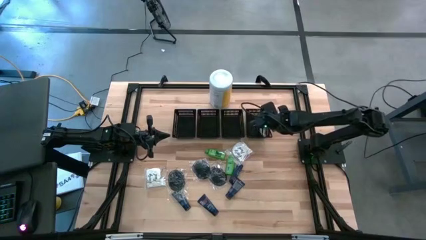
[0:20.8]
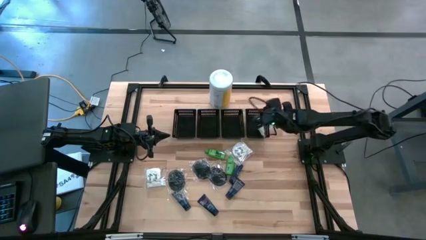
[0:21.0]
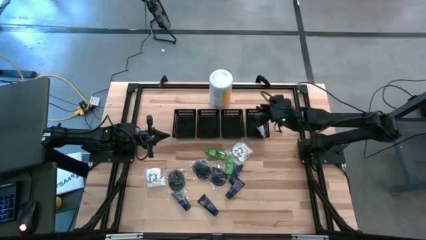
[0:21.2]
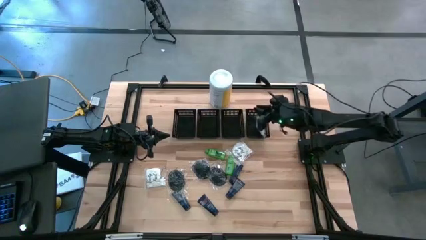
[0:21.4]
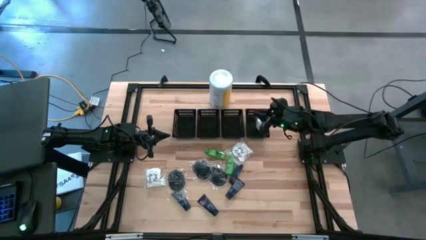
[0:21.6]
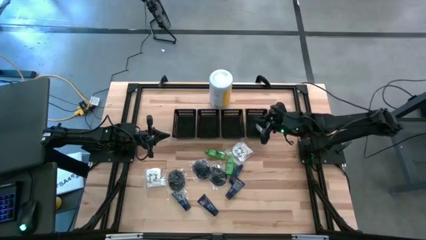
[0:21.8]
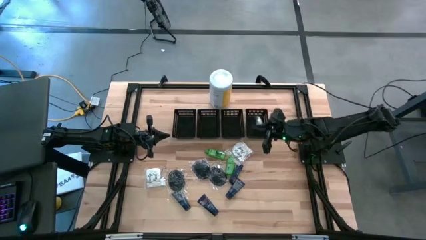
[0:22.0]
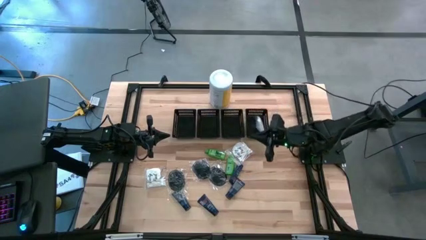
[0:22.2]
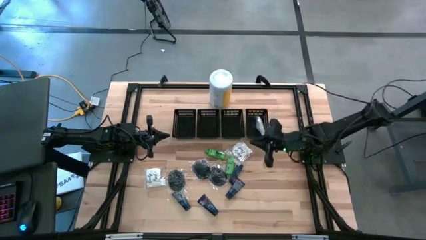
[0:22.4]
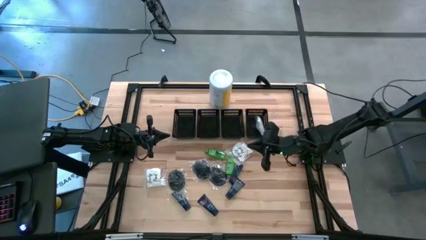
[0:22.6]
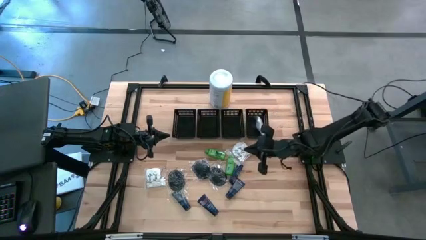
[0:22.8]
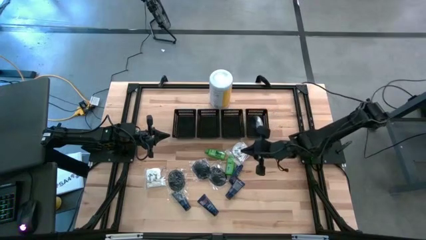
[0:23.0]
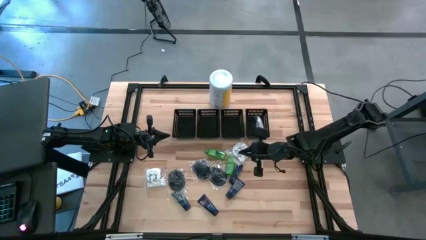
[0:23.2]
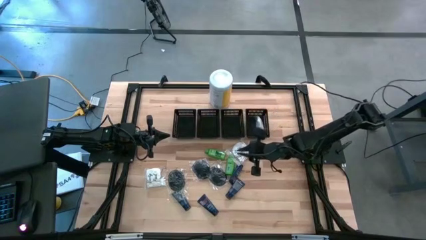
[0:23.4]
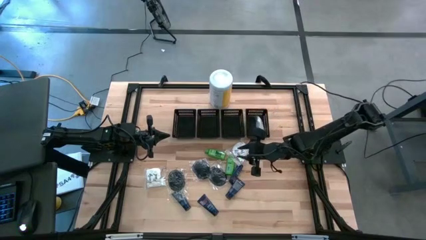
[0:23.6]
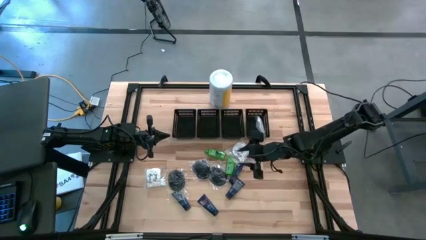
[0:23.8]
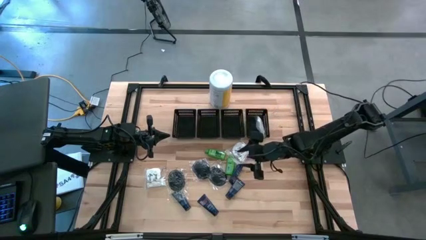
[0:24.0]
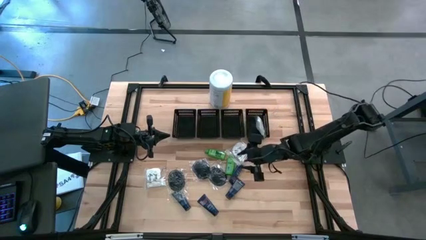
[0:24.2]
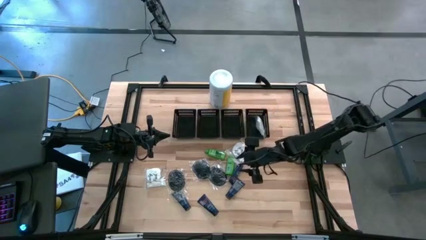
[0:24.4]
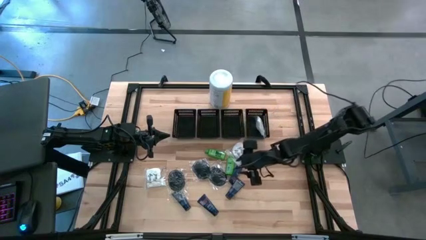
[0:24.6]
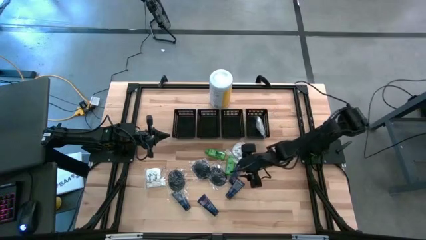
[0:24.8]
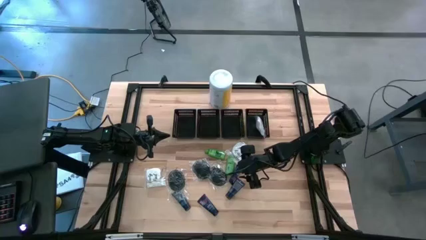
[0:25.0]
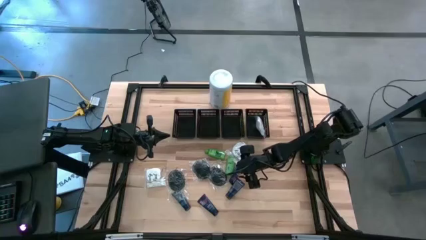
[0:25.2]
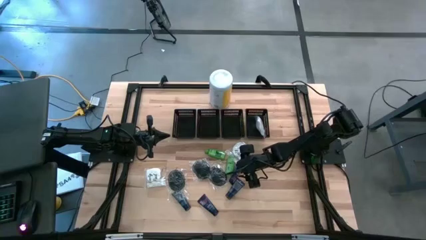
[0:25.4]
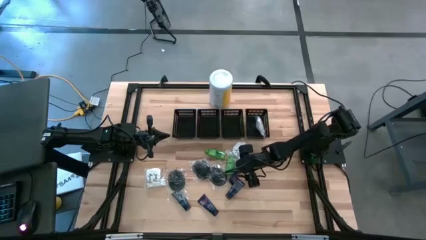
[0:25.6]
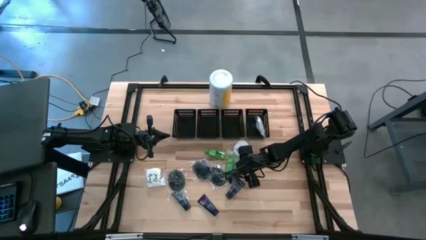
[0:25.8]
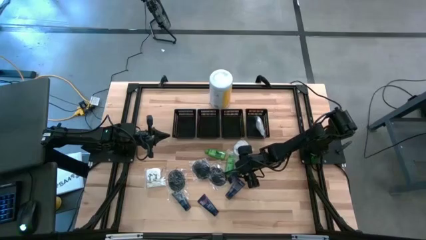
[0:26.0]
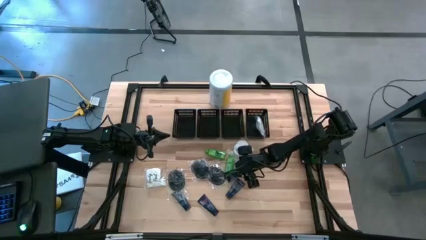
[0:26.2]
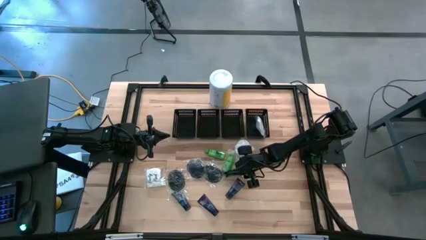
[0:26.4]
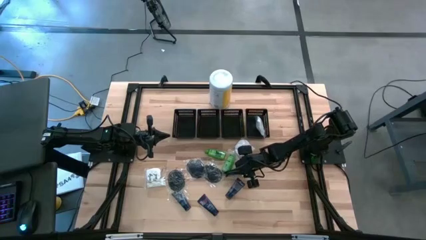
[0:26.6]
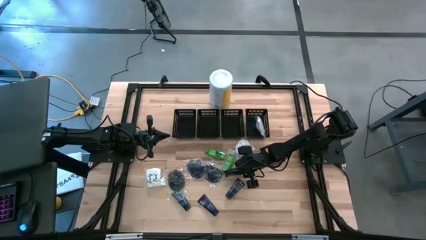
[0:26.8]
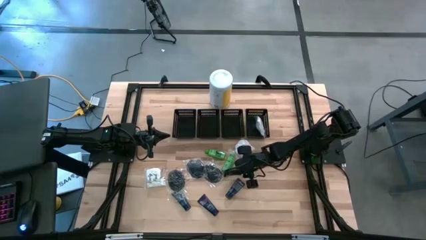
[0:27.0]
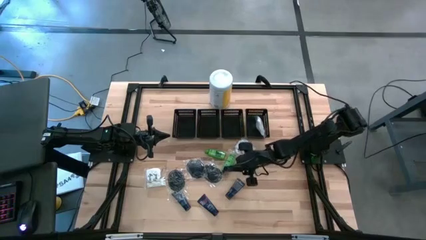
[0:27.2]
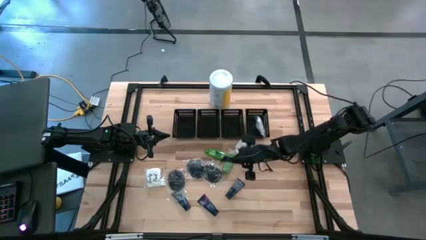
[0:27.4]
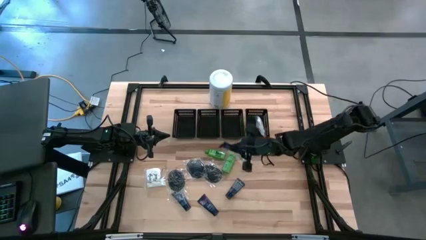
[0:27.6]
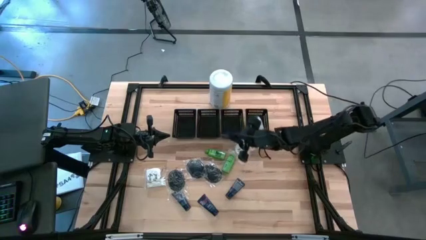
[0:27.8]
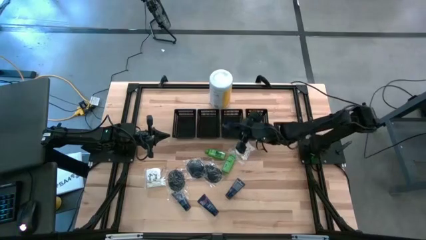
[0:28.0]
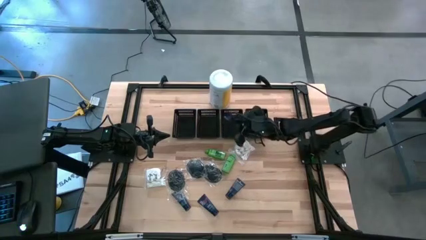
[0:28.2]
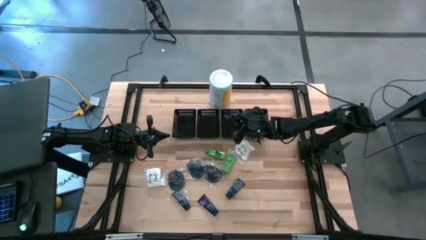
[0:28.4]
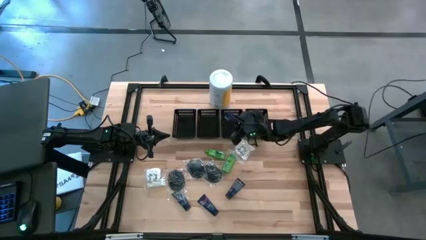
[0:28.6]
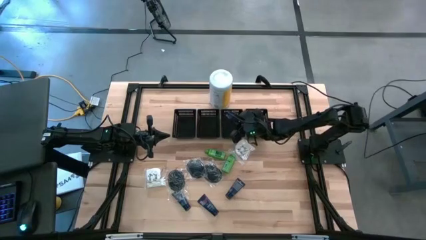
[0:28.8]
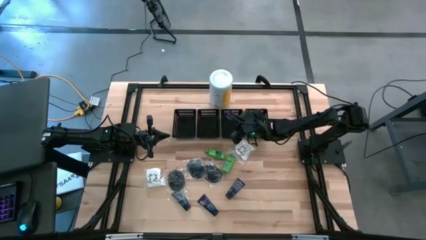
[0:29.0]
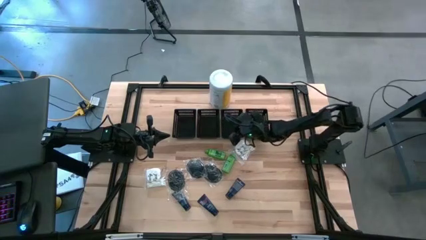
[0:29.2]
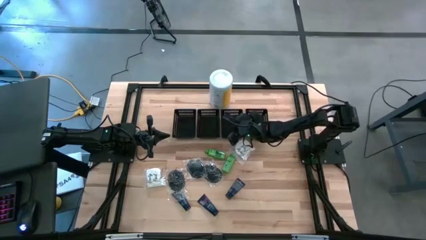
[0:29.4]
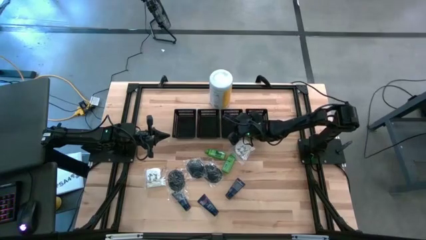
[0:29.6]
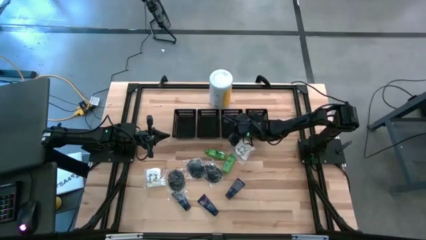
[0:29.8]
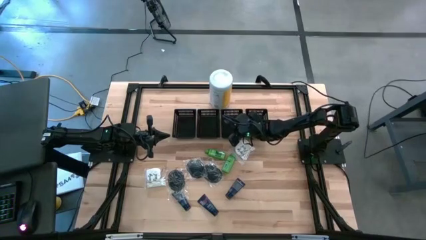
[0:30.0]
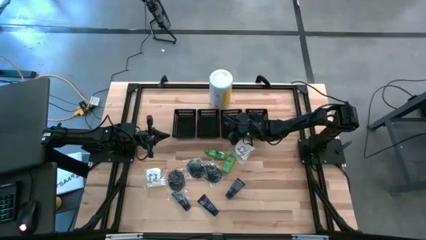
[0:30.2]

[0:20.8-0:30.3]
Task: Pick & Place Travel size toiletries
Put the top right shave cream into the middle right black bin

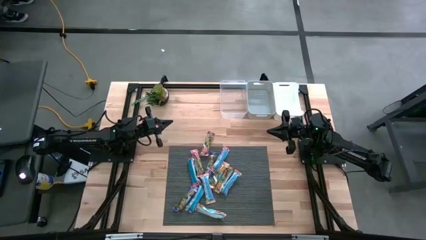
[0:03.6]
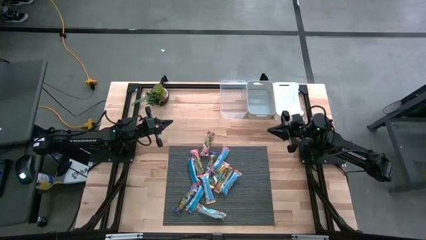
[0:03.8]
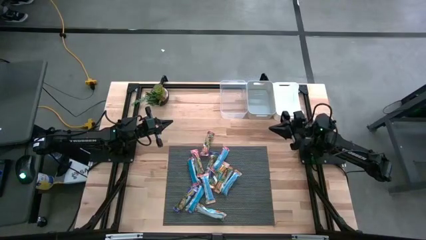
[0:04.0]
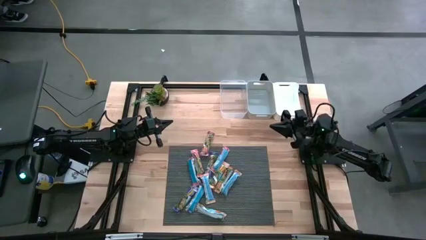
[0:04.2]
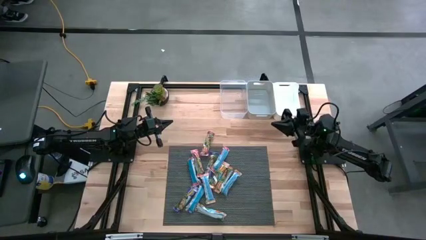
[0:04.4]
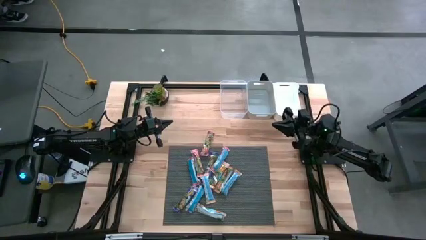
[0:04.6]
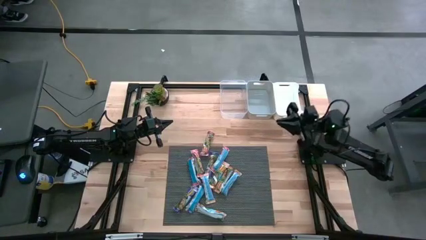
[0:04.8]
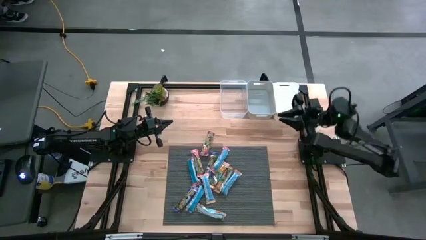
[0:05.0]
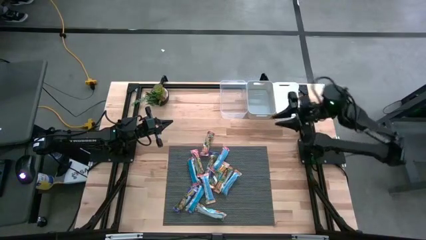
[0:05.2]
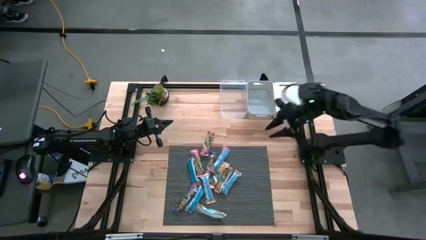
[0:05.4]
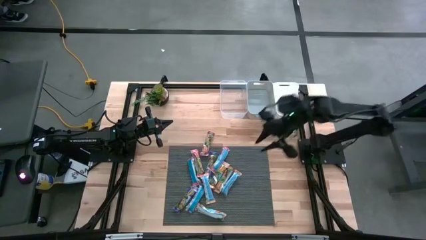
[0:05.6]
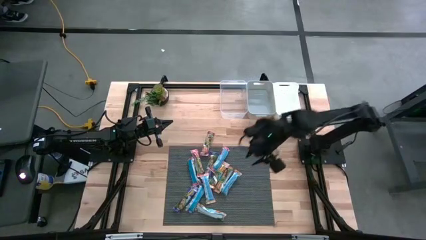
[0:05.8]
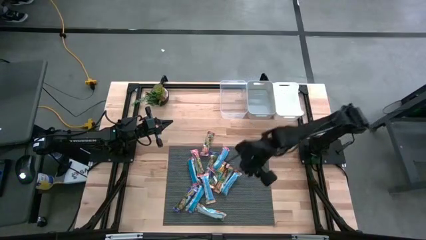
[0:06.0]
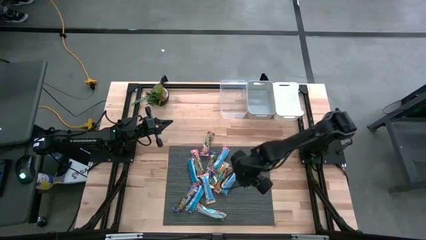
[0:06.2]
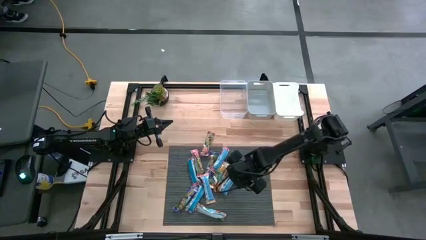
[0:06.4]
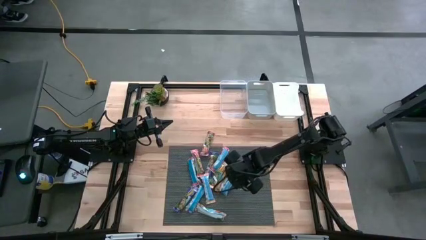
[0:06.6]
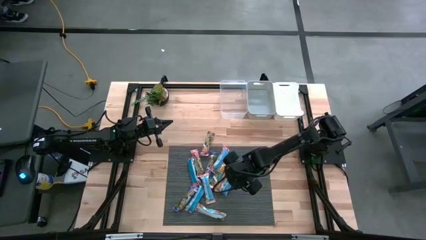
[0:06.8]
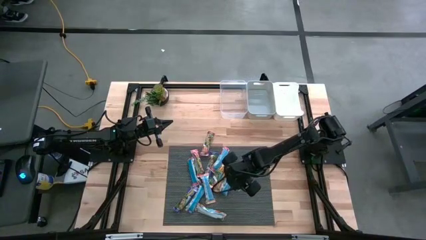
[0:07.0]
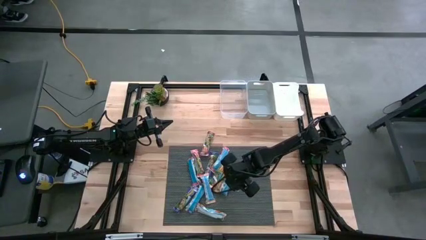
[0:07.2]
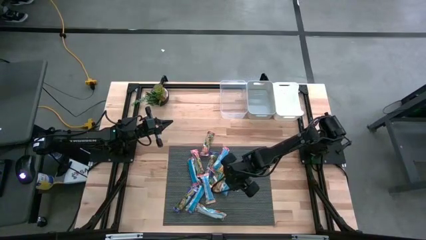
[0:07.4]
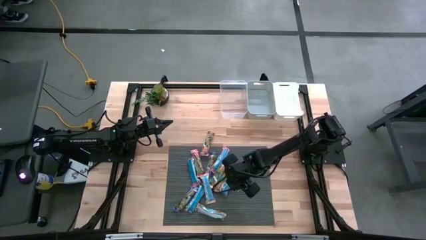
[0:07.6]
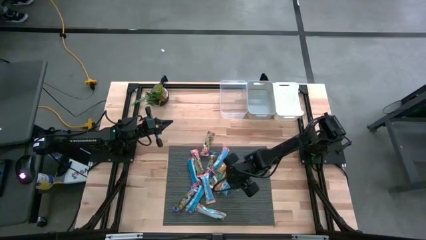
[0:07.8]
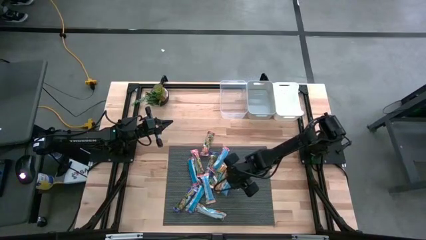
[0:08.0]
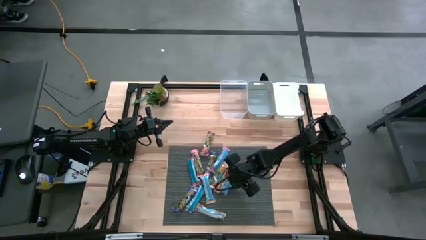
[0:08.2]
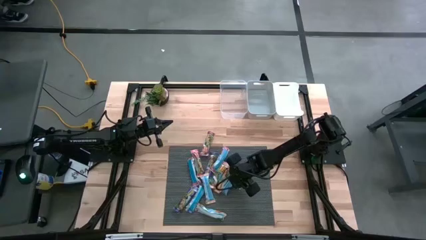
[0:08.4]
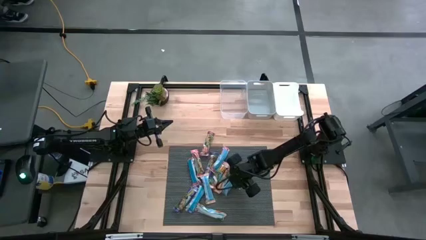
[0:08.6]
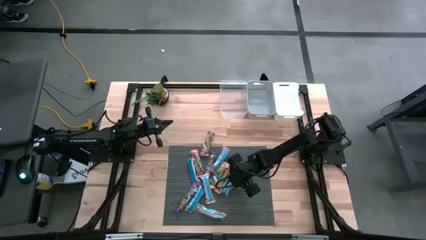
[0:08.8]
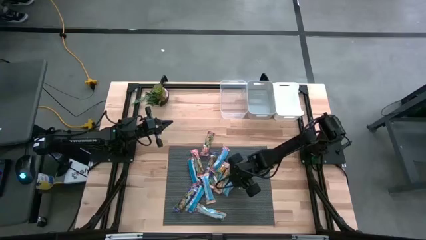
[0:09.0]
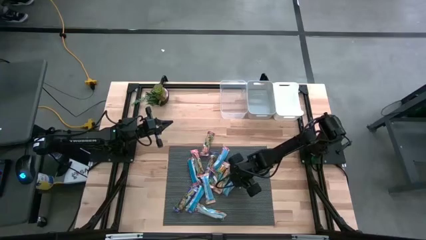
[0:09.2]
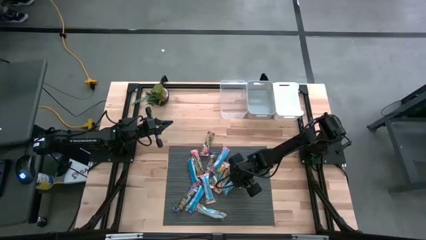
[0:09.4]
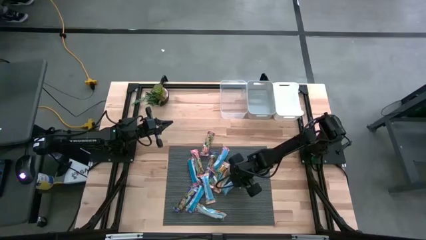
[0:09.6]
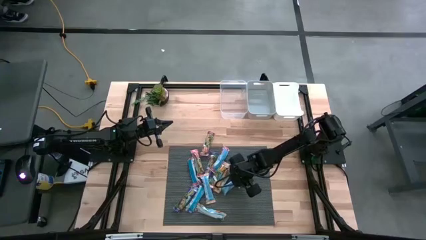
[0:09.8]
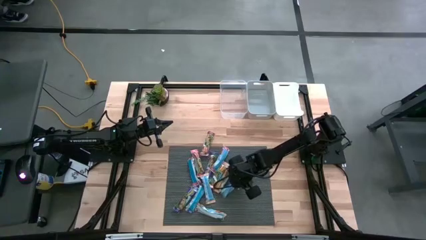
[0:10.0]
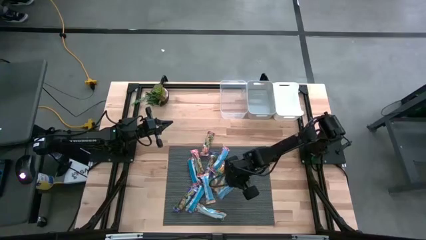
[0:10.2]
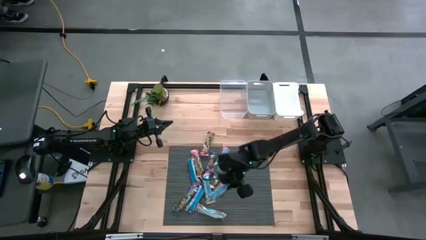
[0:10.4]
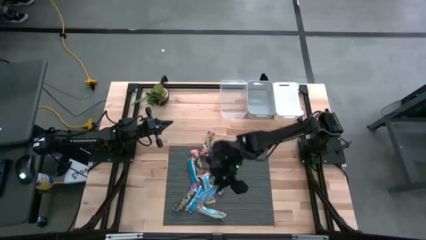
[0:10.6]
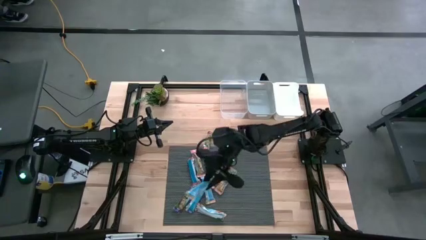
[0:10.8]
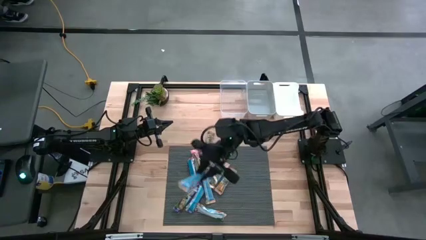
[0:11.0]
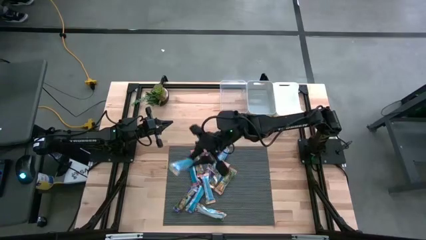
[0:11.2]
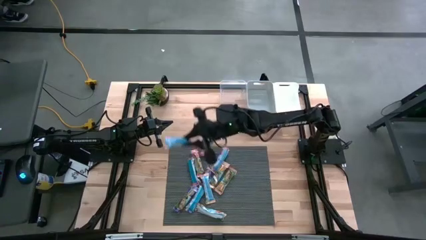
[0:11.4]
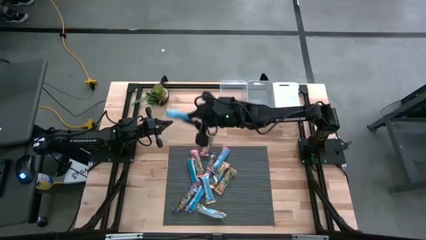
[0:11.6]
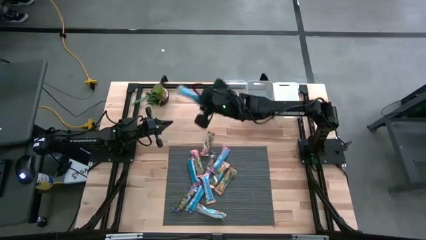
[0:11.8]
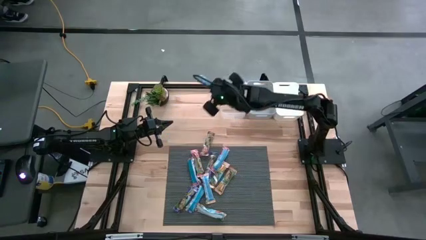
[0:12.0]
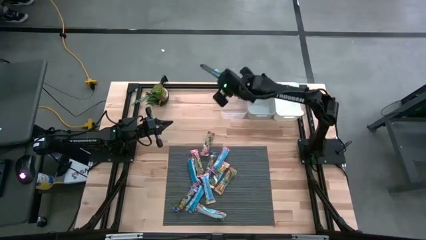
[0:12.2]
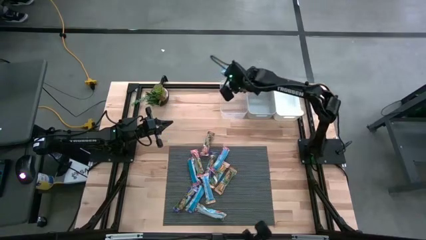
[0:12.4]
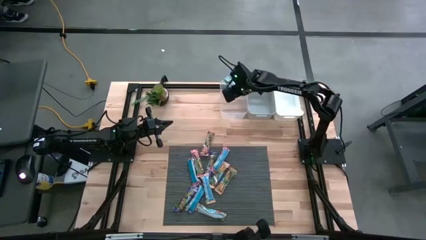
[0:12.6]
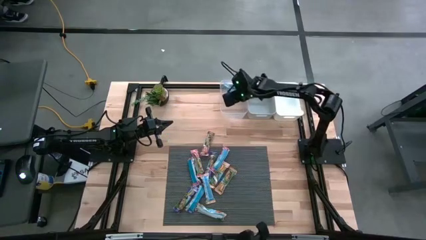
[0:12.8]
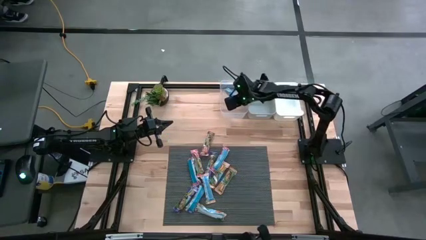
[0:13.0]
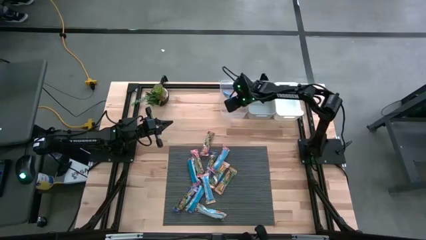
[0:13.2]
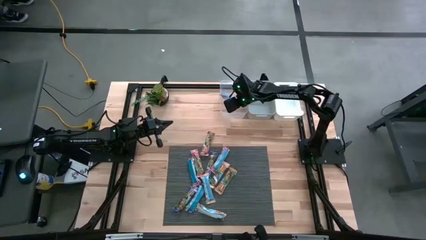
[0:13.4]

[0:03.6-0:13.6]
Task: Pick and place Granola Bars by type
Put the yellow granola bar into the transparent bin
